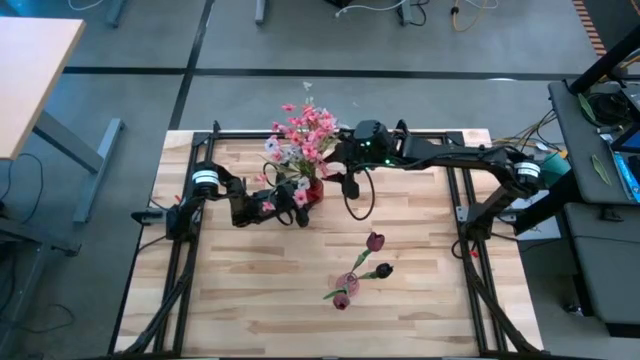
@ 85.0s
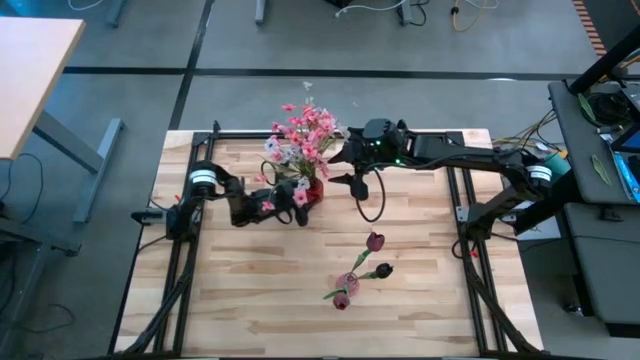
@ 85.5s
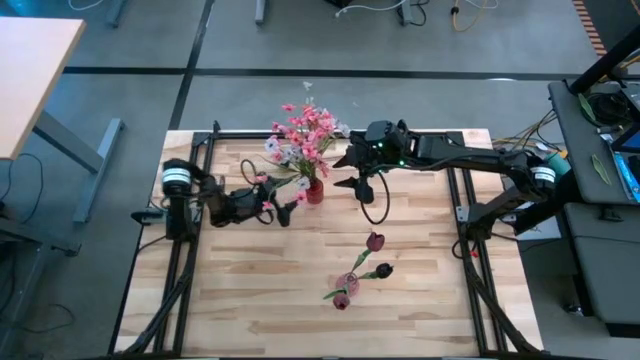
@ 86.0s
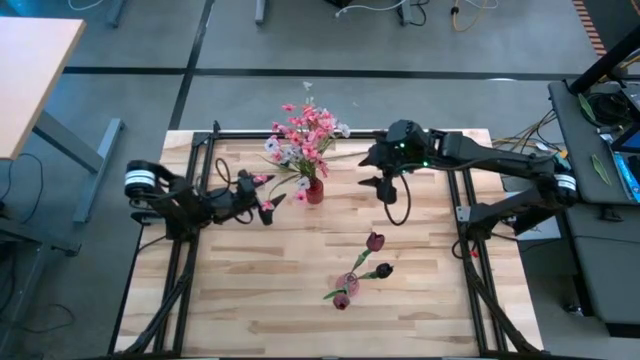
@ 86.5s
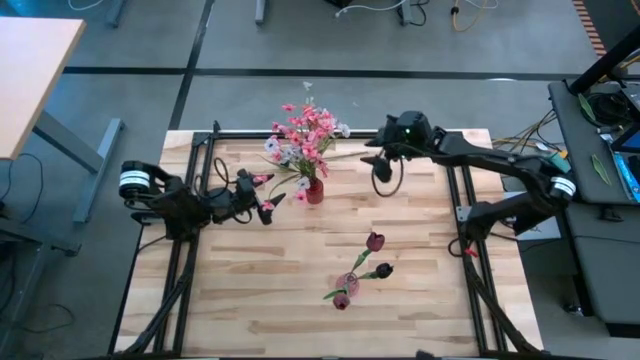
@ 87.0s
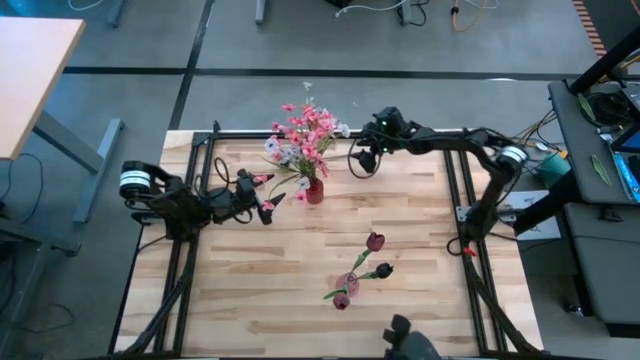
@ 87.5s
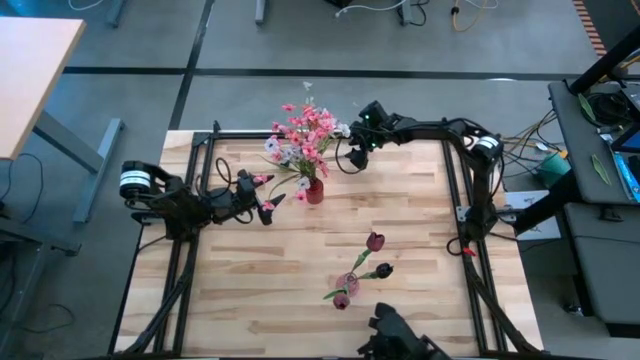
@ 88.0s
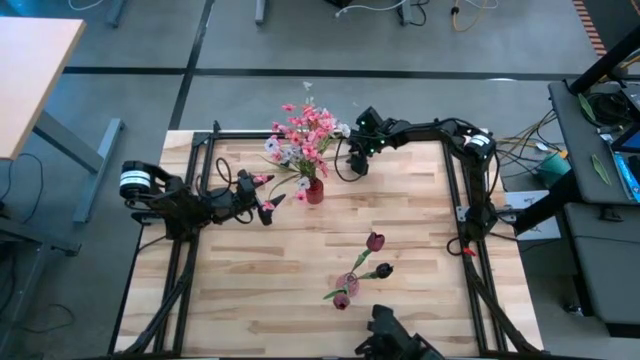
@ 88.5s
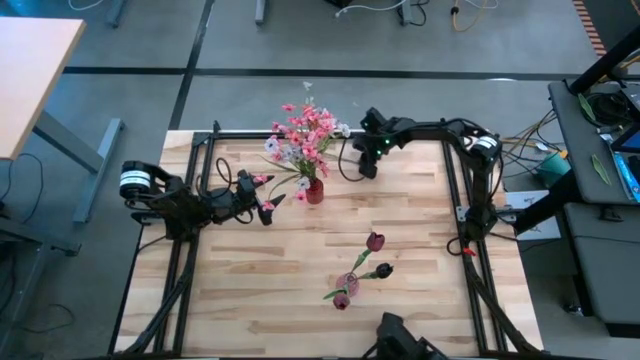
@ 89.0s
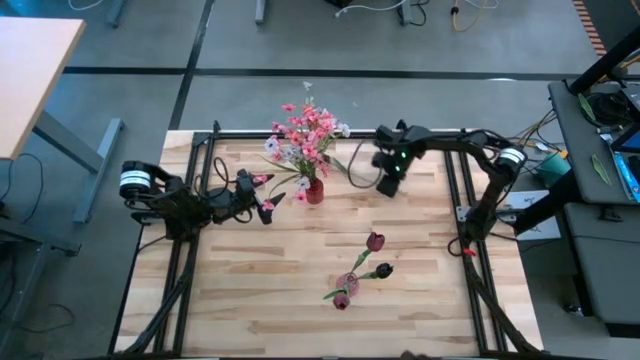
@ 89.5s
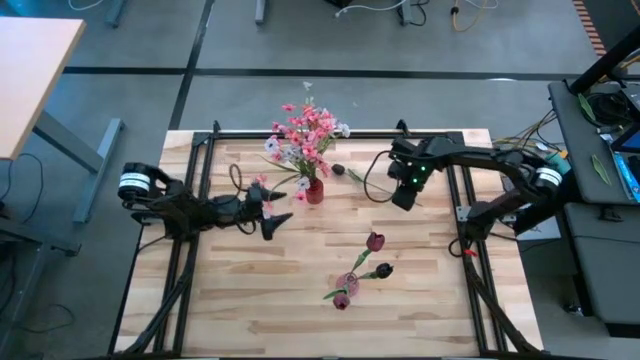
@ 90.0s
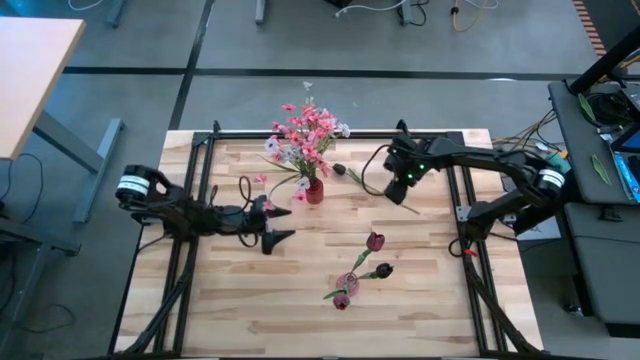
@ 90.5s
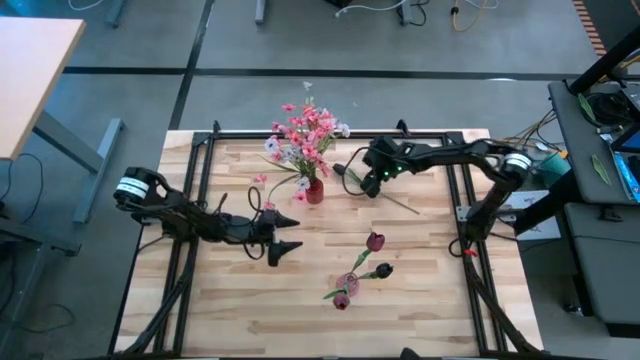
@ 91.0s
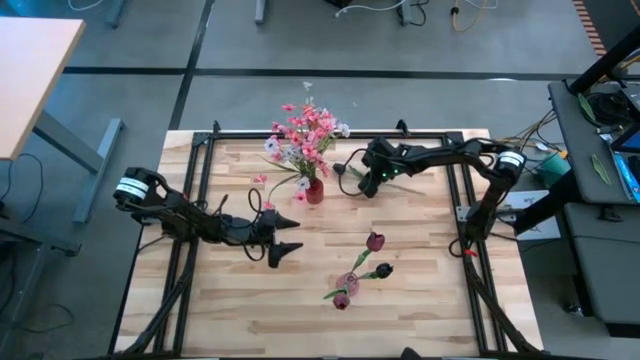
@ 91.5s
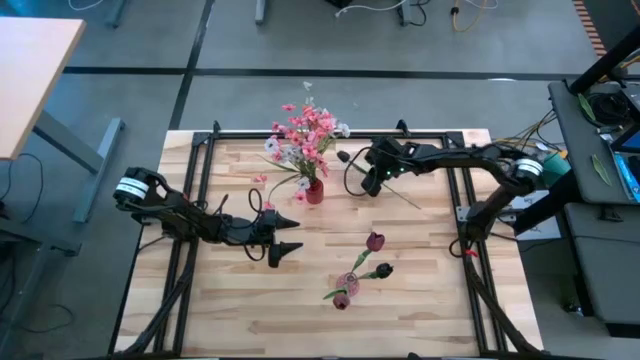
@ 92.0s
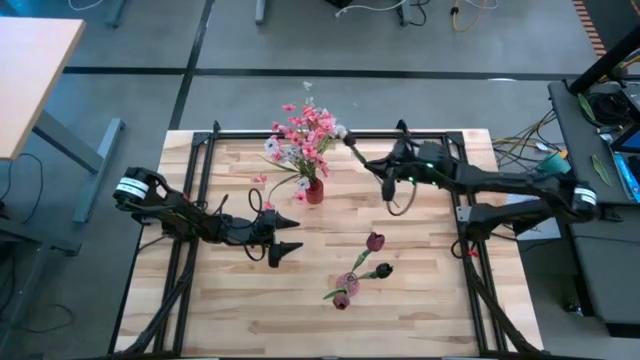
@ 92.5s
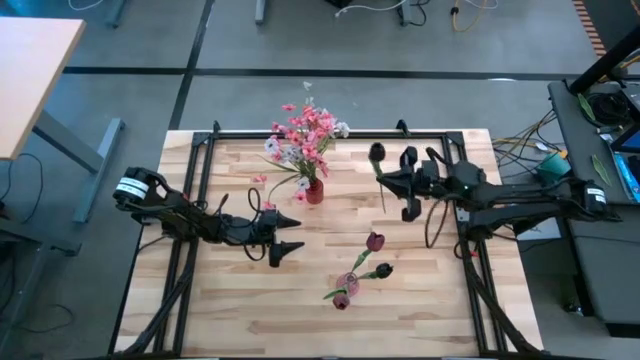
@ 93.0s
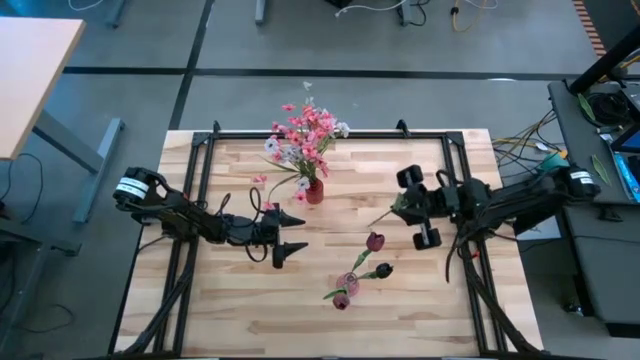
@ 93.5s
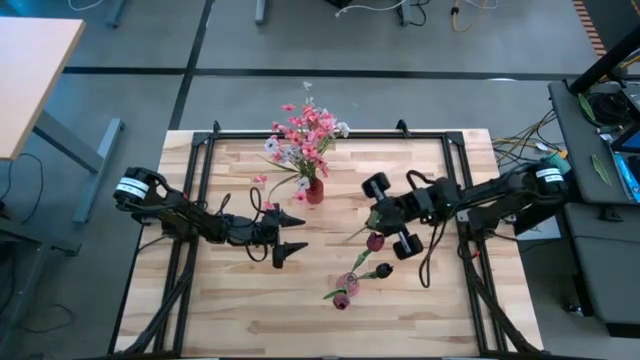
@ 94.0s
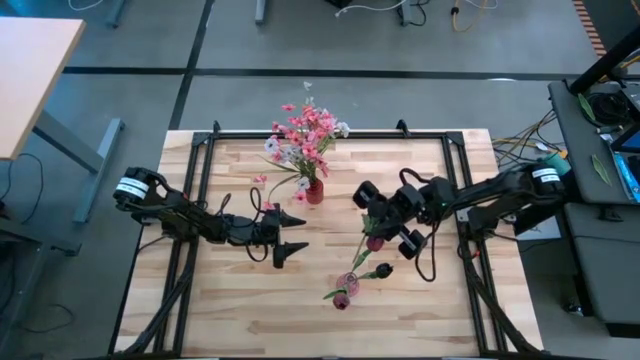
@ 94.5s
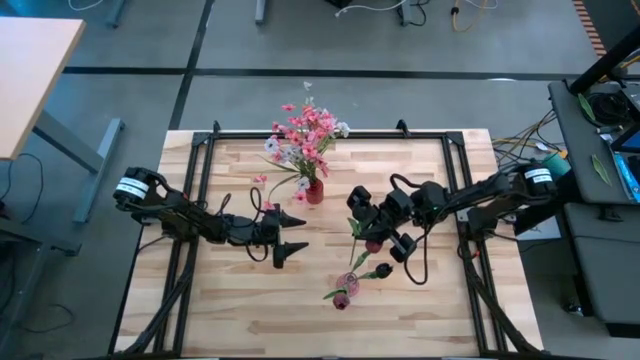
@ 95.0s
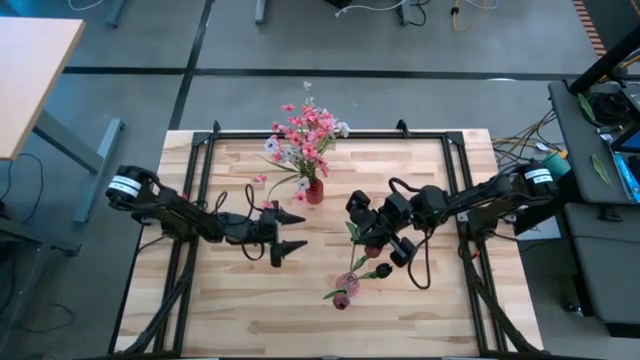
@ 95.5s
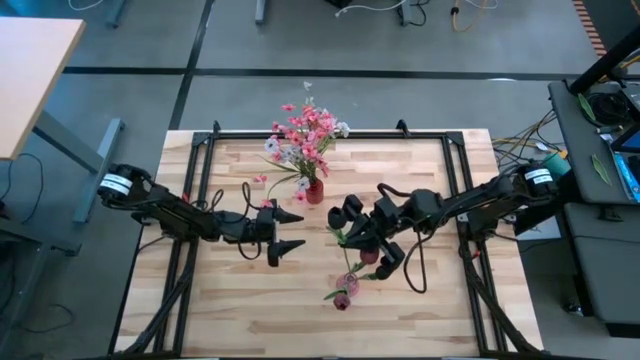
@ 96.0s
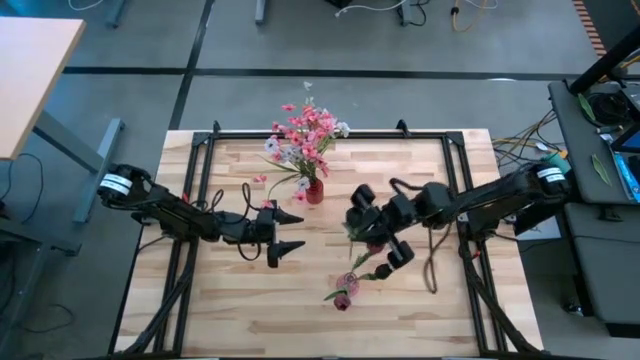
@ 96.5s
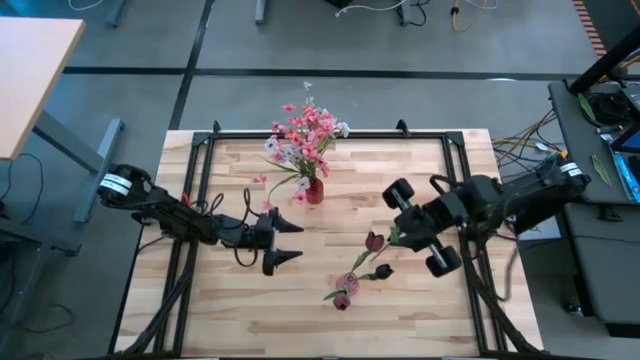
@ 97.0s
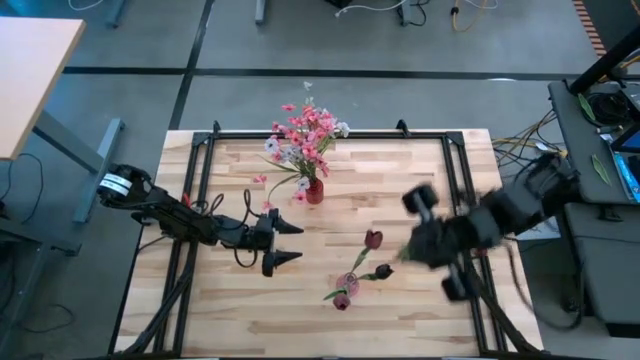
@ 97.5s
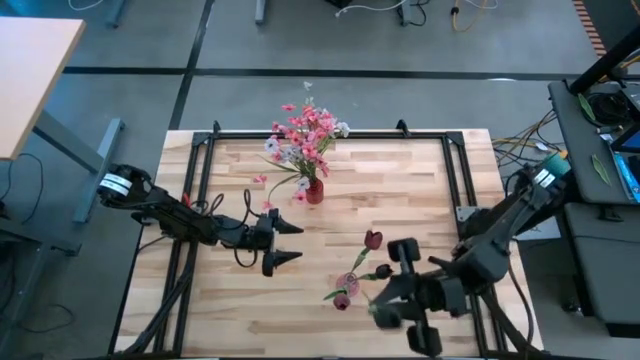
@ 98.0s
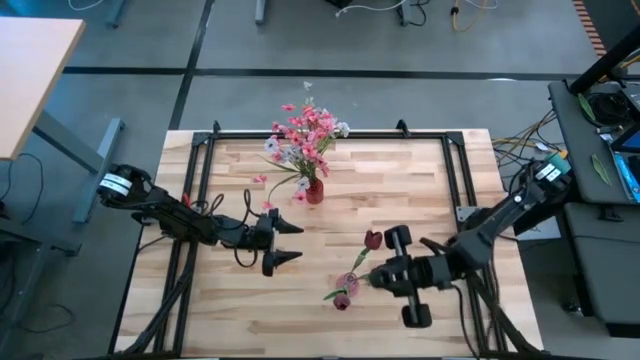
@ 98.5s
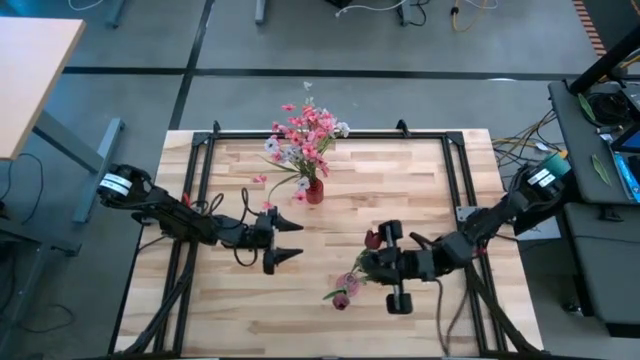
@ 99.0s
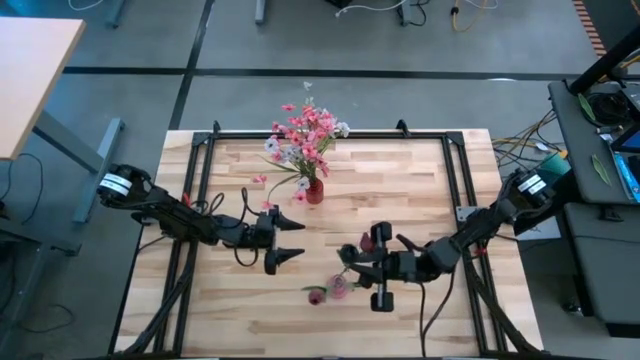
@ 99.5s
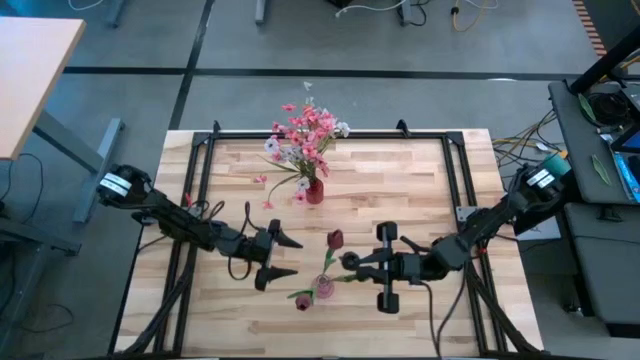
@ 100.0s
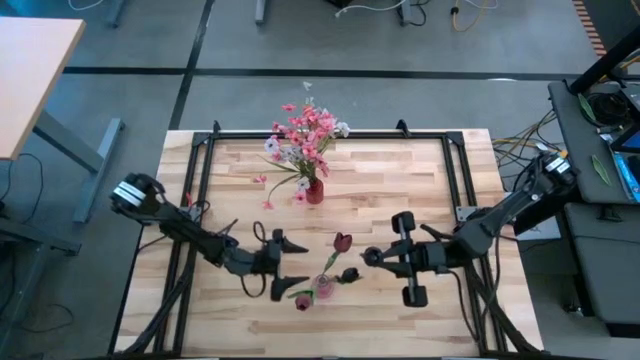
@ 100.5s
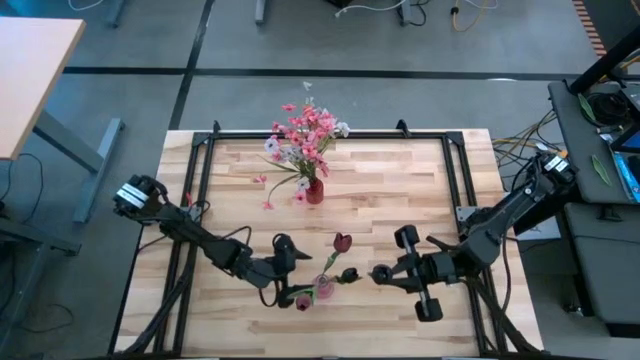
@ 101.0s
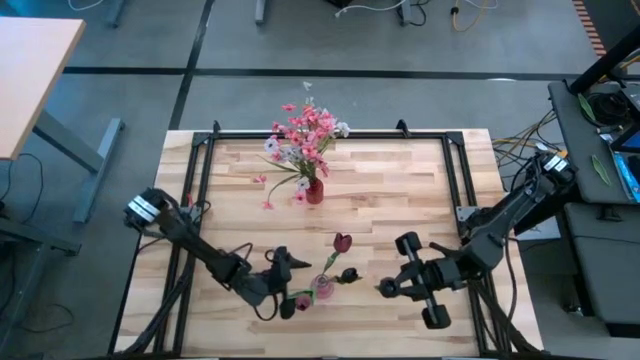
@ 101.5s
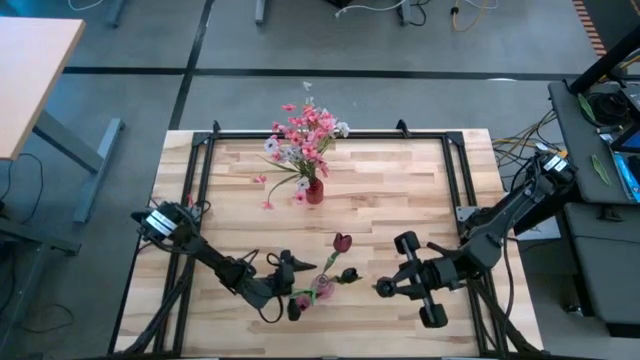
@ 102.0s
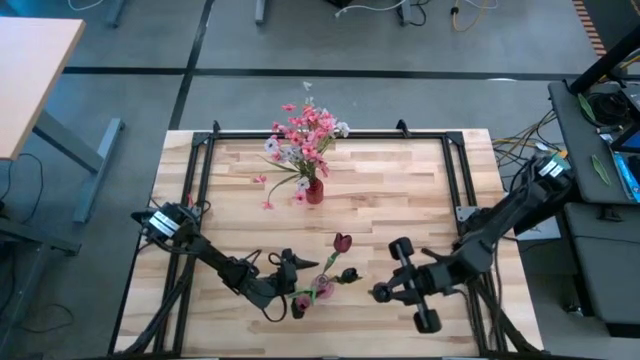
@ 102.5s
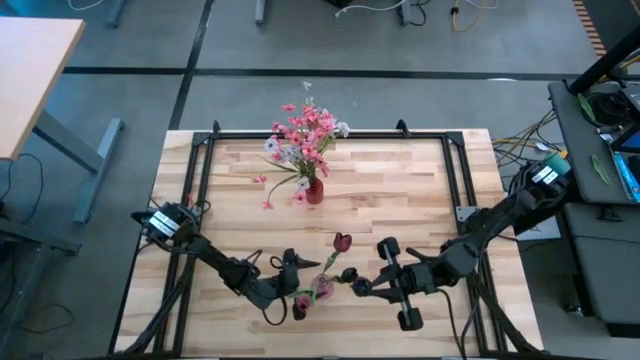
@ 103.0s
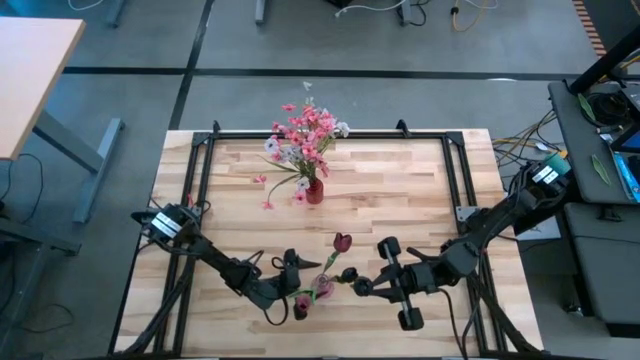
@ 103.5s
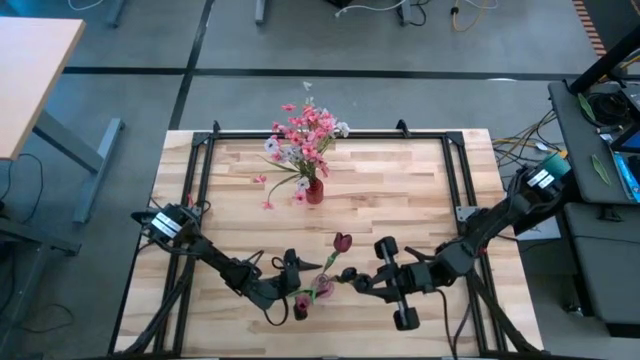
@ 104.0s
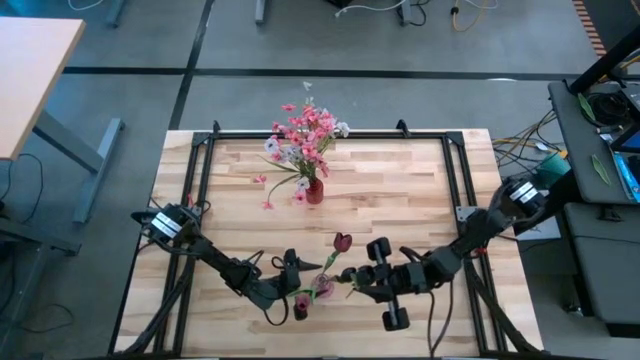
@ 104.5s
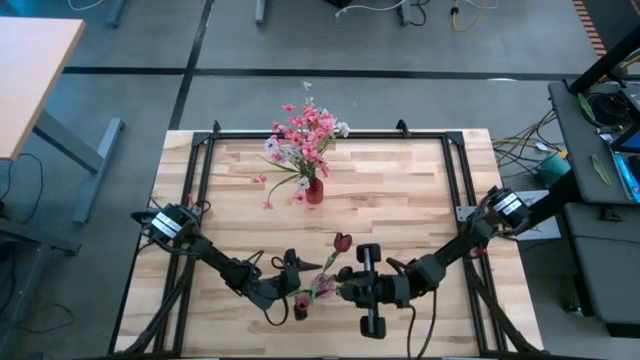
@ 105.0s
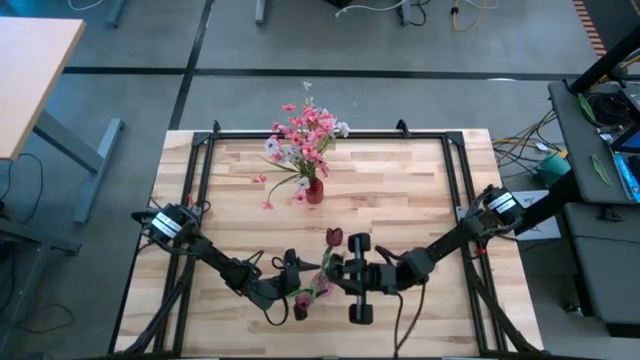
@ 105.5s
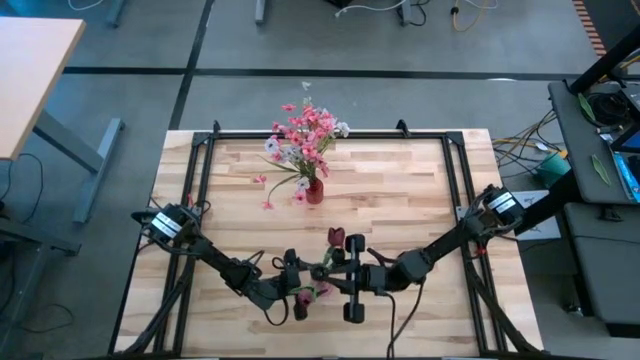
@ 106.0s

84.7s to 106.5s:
Task: Sort flowers into vase by color
Put the black flower into the purple vase
